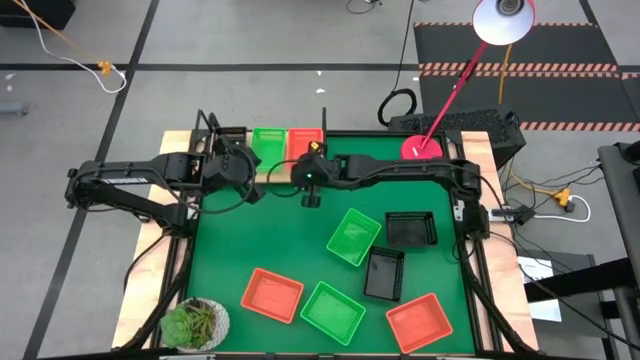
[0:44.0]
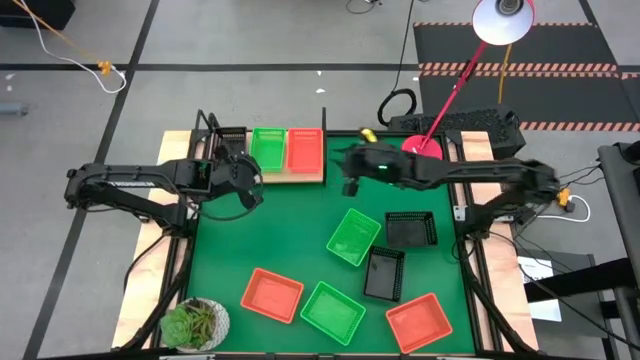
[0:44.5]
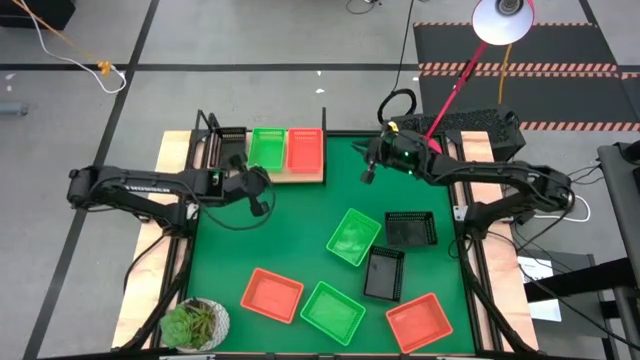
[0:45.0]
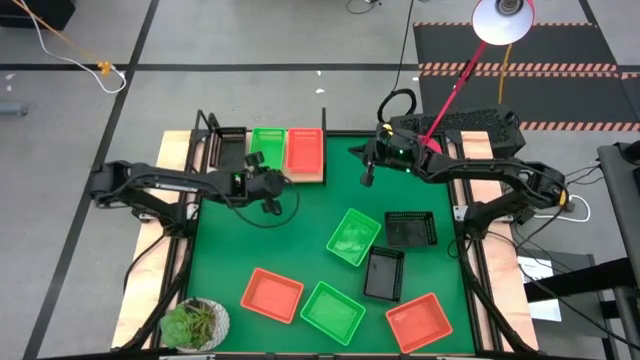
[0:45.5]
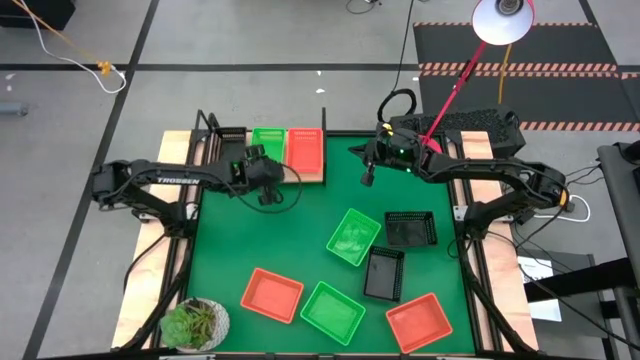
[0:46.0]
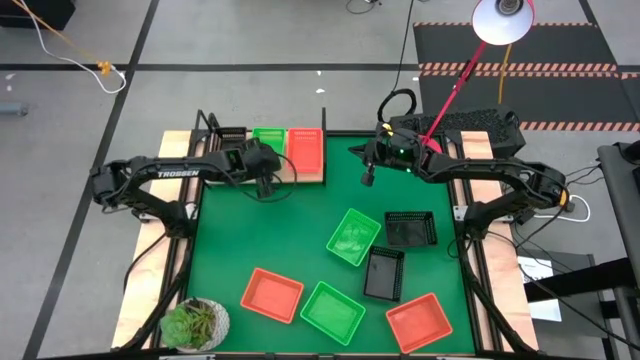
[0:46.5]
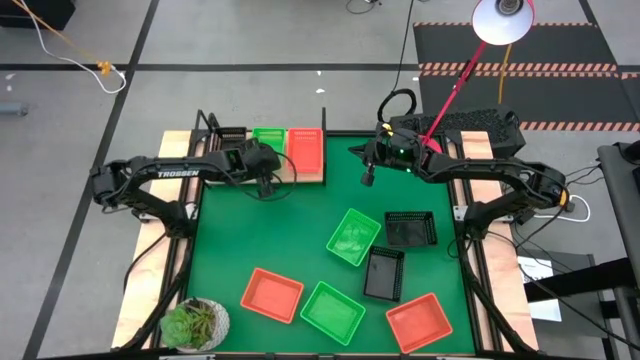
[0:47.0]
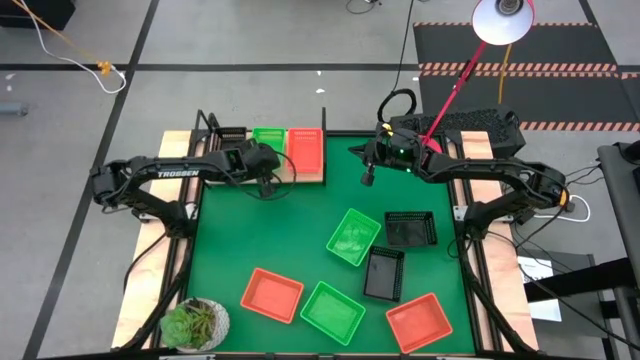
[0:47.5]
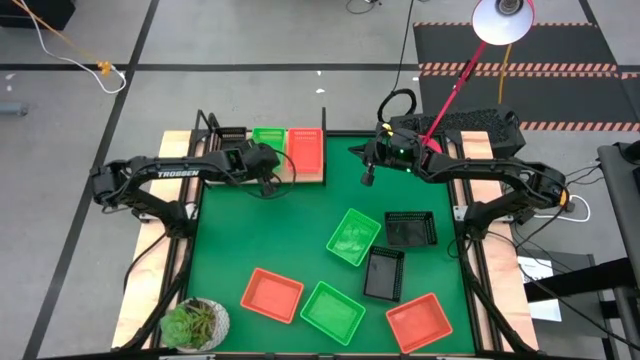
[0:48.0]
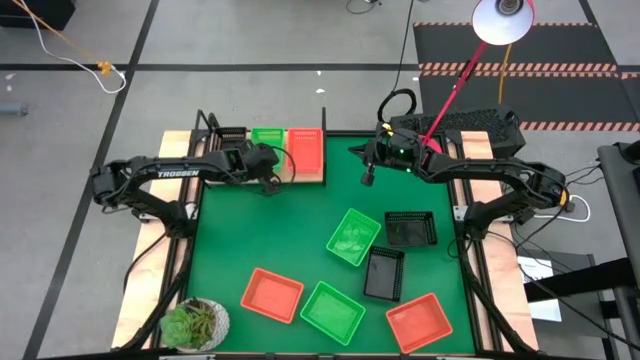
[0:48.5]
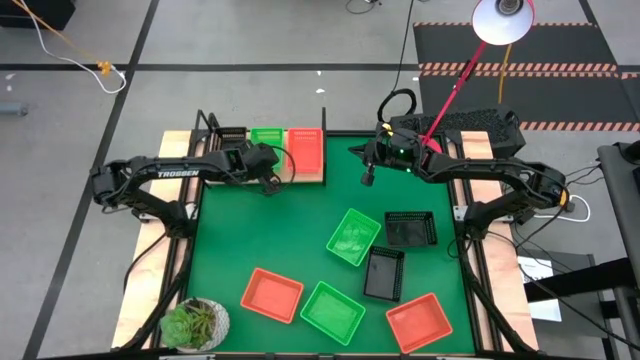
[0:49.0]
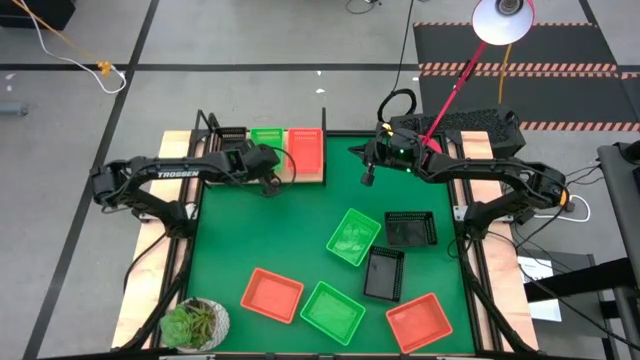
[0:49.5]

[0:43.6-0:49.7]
Task: Stack baskets on shelf by color
Adjust the green bin on the shelf

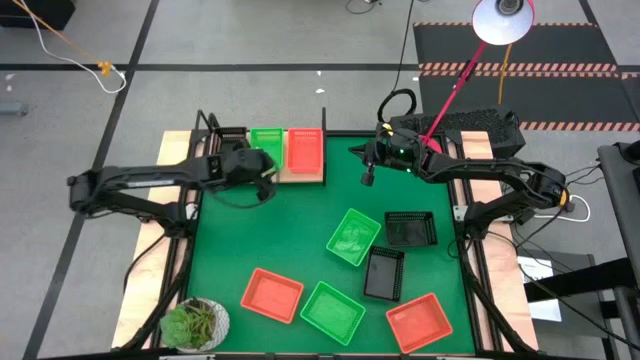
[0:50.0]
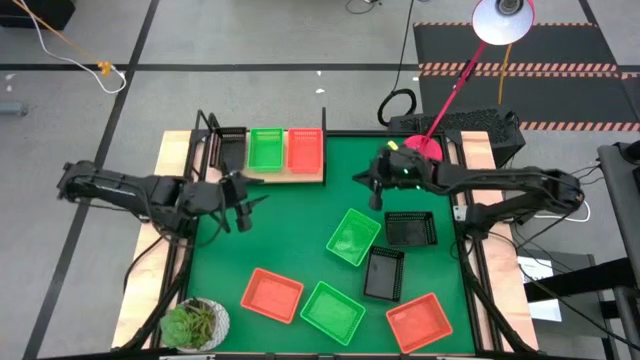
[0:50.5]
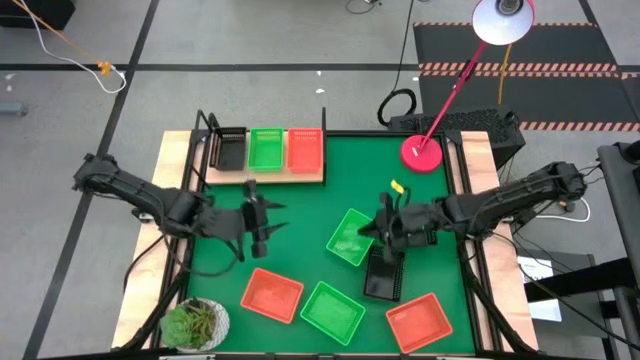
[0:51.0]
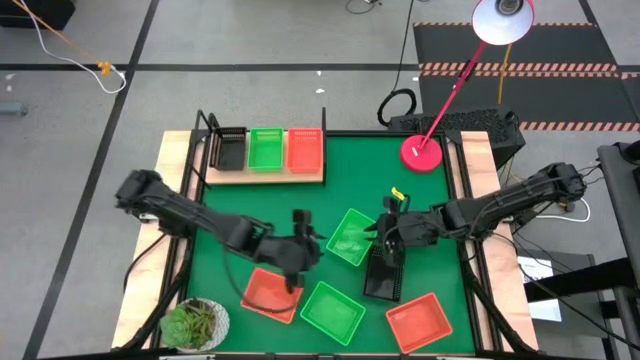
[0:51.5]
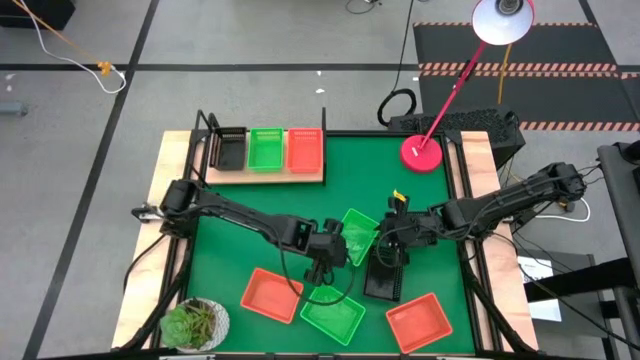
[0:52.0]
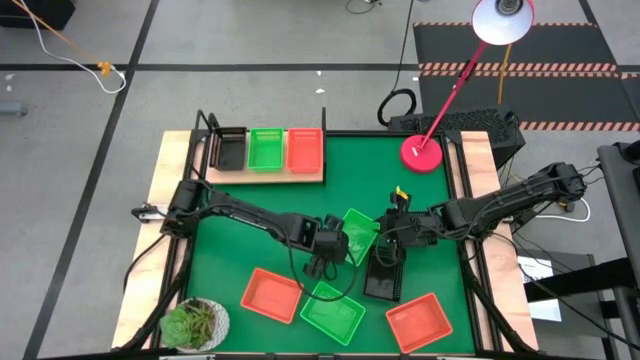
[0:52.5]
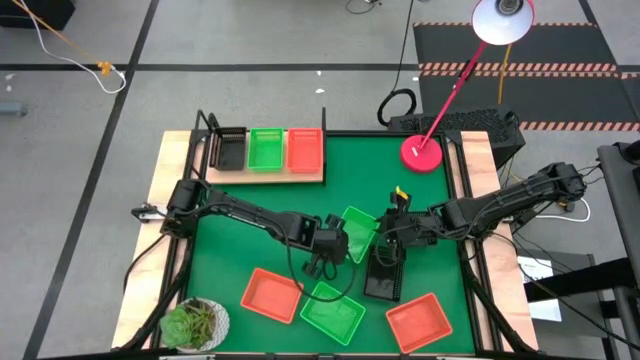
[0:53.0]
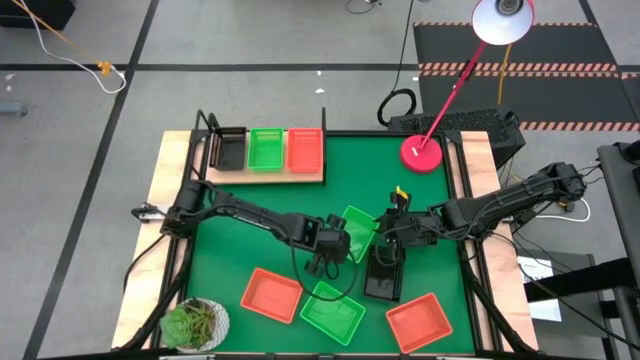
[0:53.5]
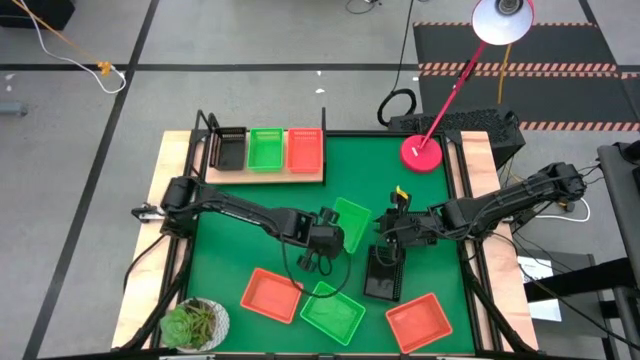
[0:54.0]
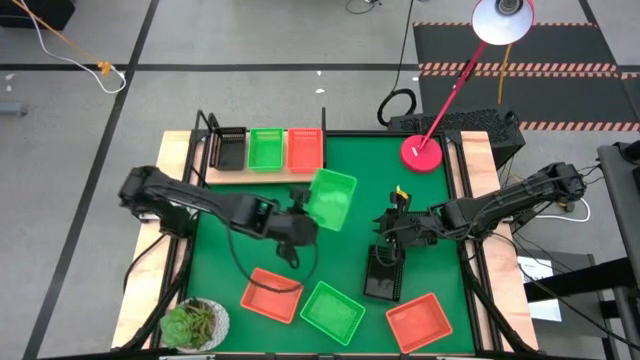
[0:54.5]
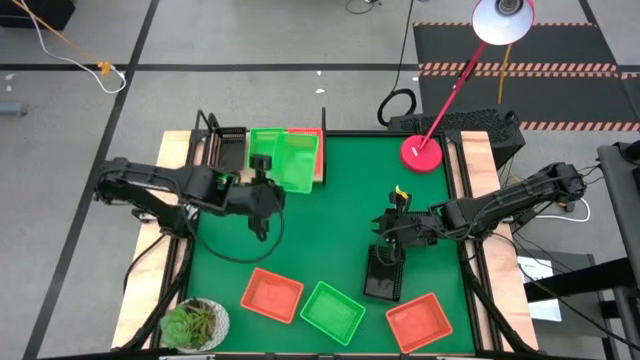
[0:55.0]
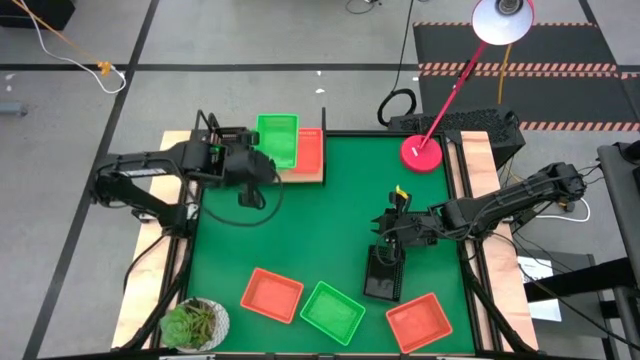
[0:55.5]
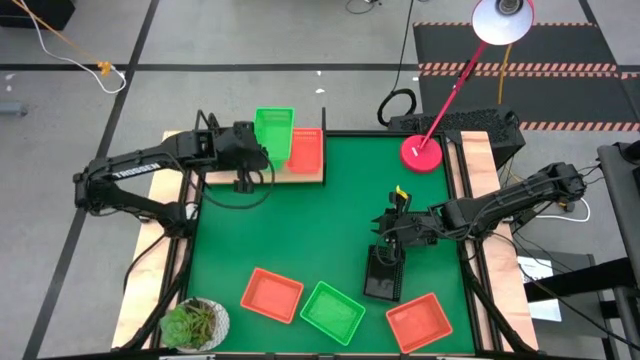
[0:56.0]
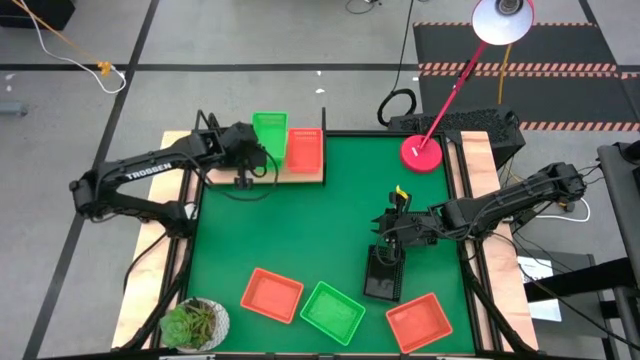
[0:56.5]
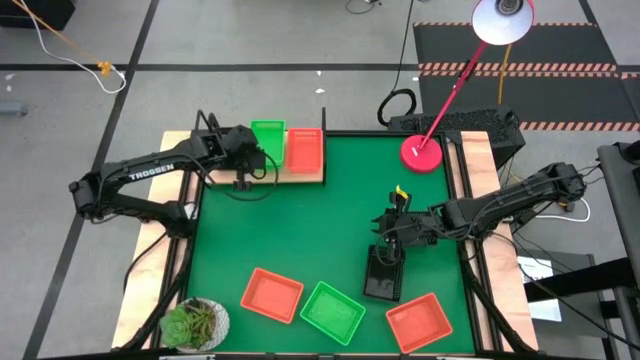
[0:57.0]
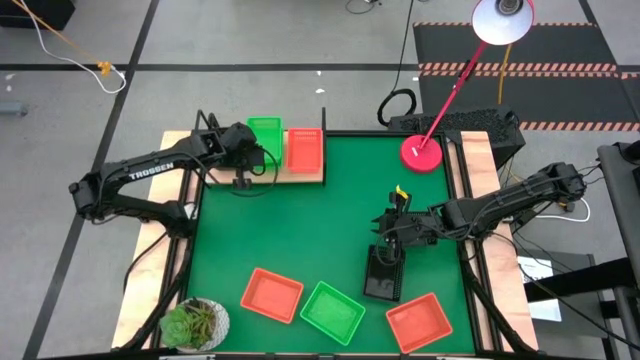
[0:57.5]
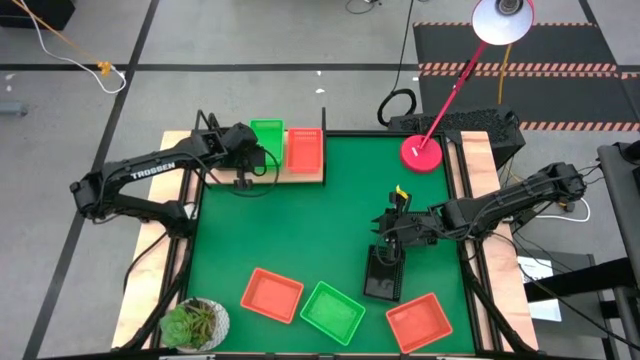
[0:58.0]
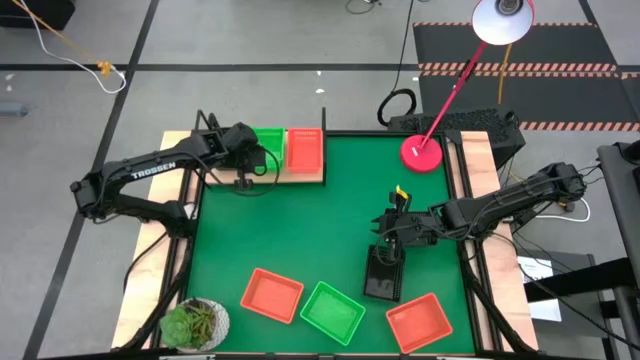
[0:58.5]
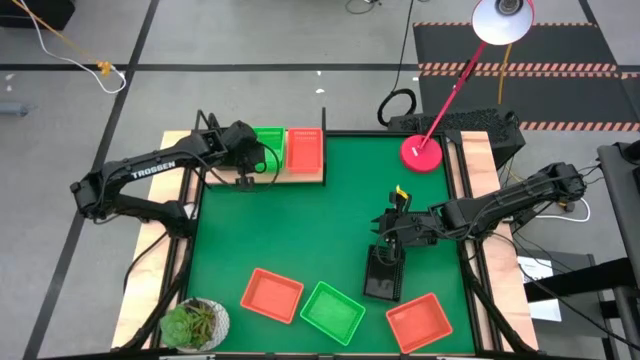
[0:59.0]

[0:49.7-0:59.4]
Stack the green bin on top of the green bin on the shelf

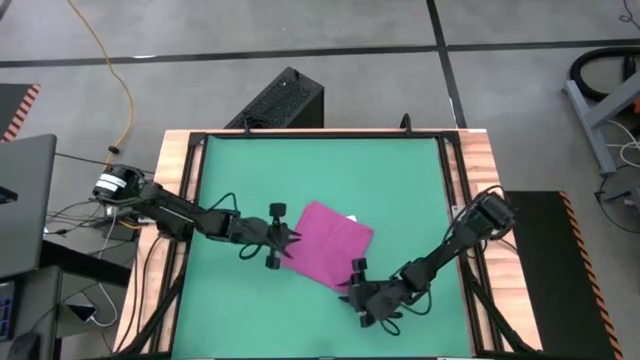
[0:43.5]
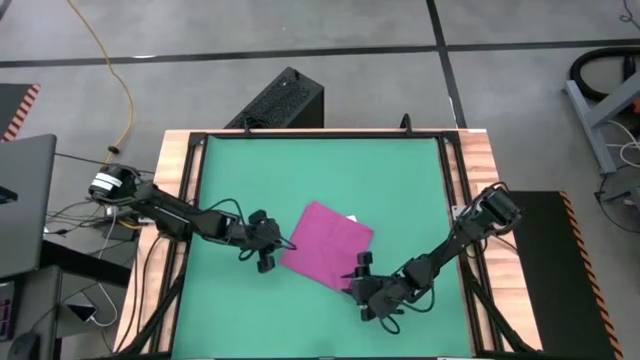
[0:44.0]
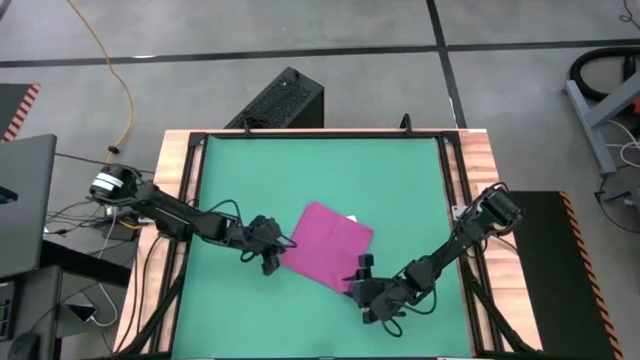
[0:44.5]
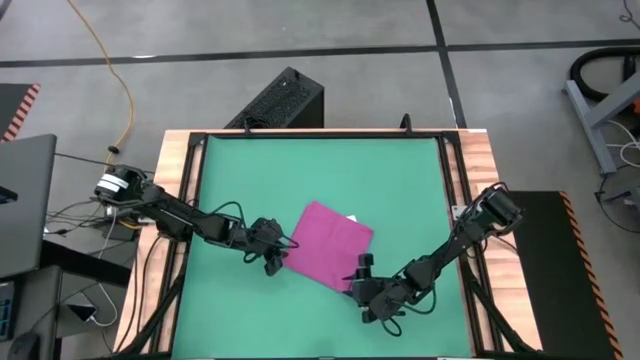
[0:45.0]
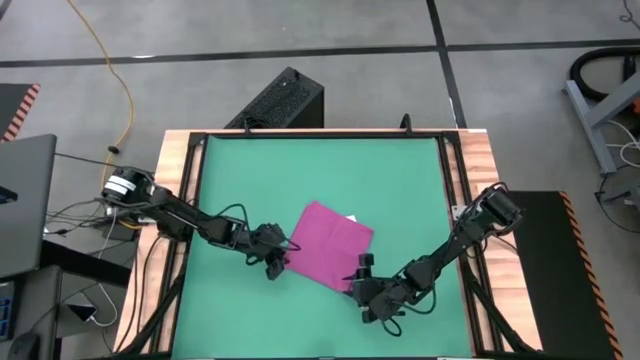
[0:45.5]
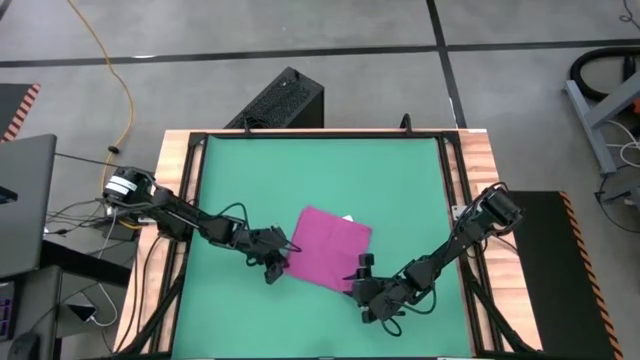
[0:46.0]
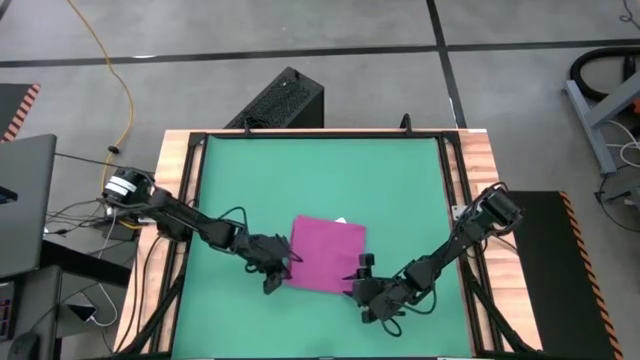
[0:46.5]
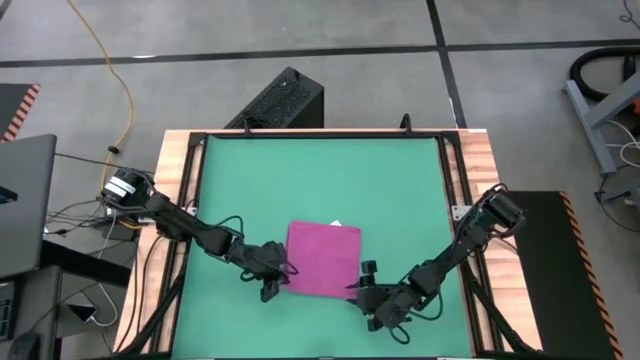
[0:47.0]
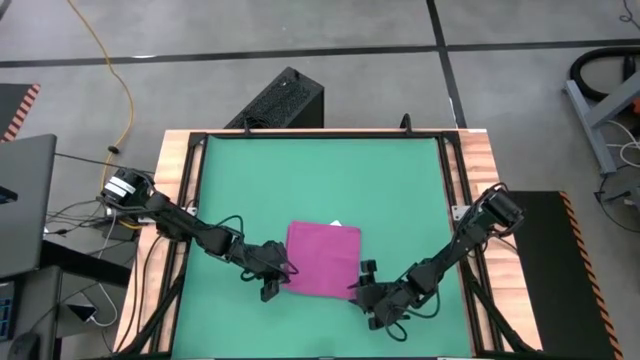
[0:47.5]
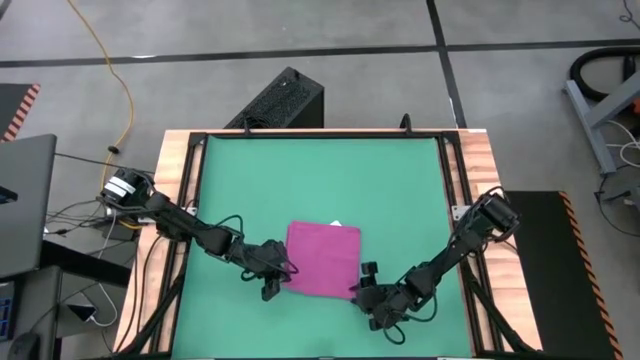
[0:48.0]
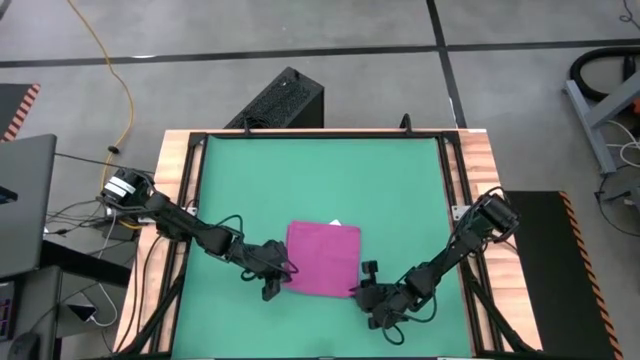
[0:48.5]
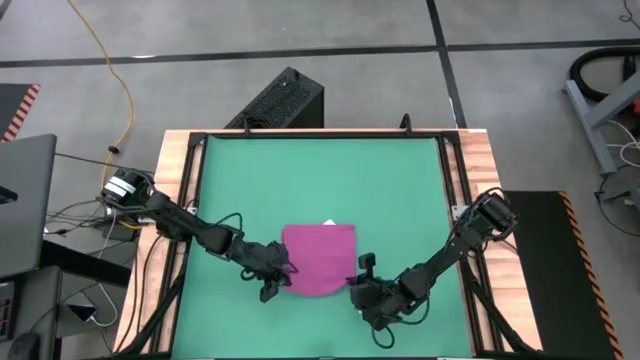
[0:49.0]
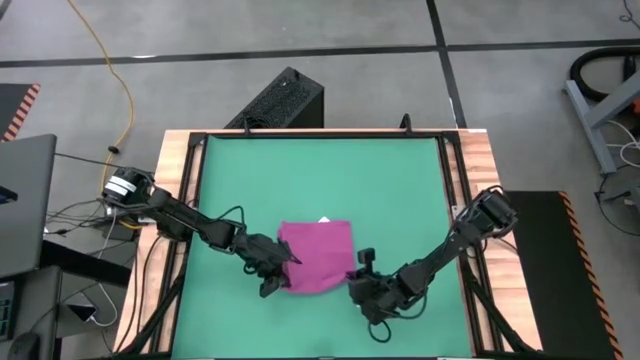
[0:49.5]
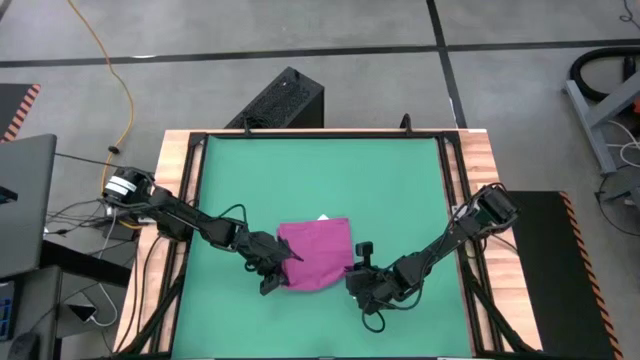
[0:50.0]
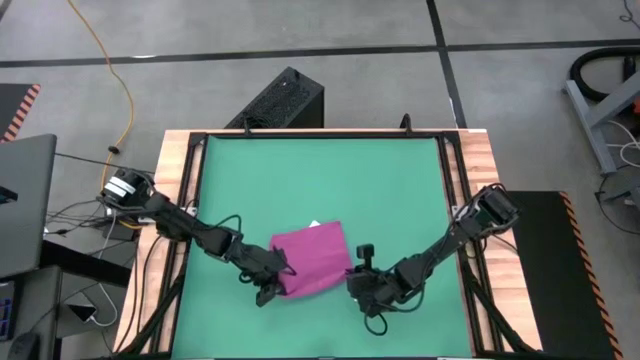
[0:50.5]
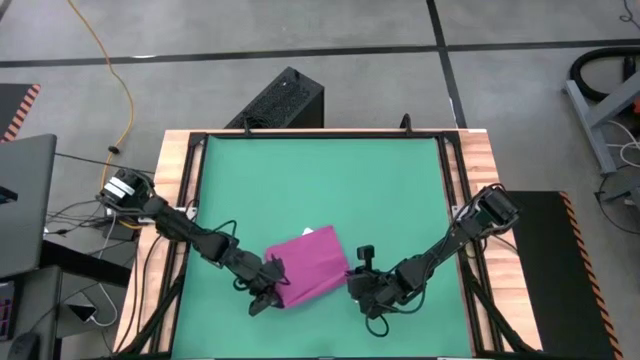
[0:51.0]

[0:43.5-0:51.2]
Task: Roll towel
Roll the violet towel
